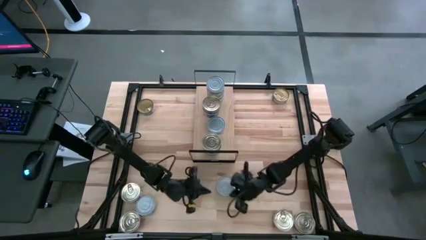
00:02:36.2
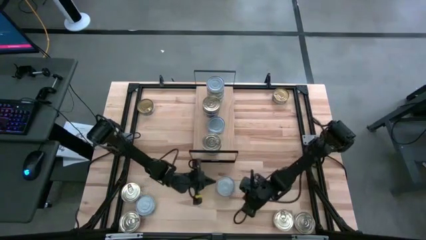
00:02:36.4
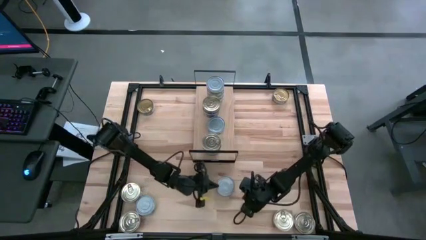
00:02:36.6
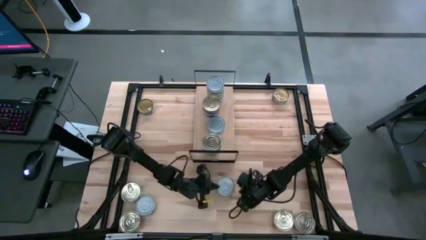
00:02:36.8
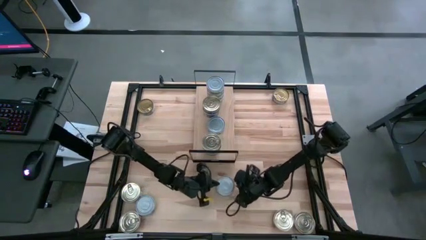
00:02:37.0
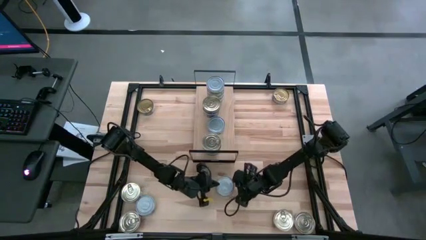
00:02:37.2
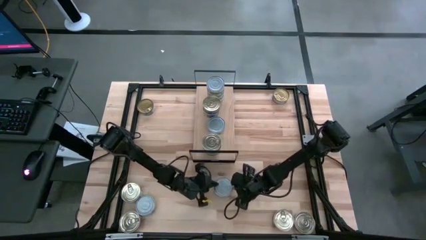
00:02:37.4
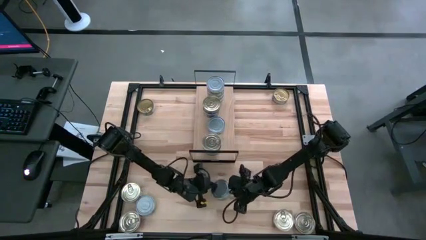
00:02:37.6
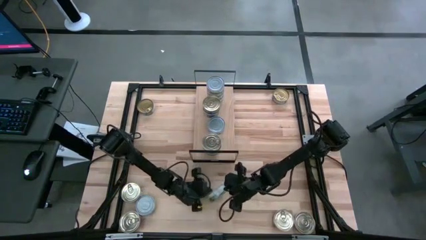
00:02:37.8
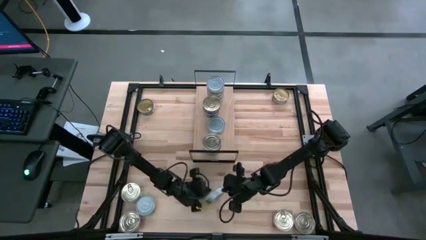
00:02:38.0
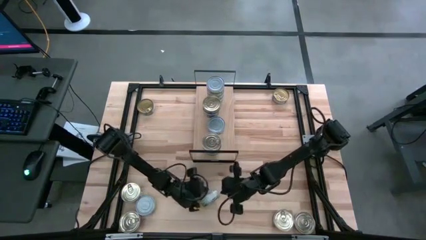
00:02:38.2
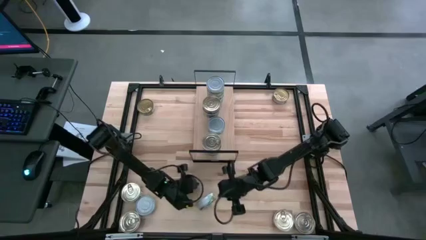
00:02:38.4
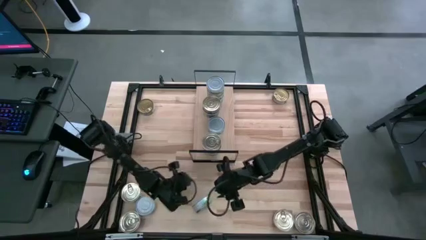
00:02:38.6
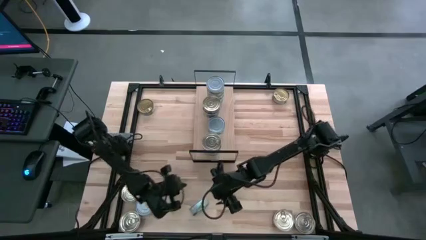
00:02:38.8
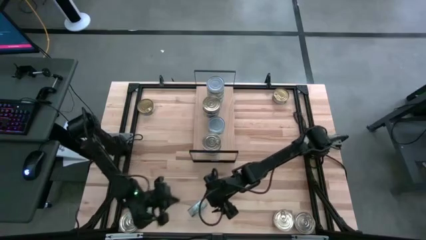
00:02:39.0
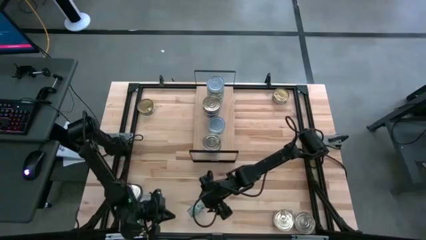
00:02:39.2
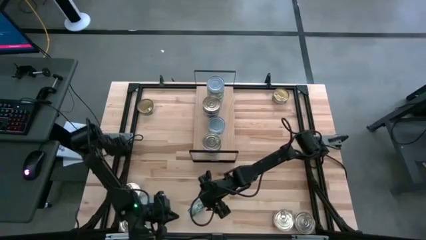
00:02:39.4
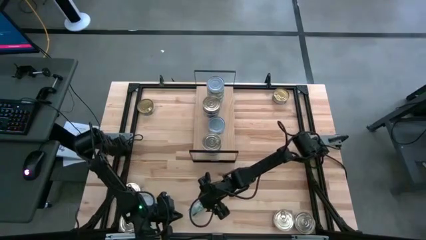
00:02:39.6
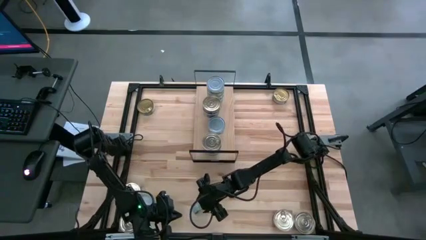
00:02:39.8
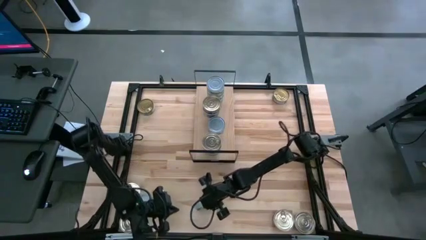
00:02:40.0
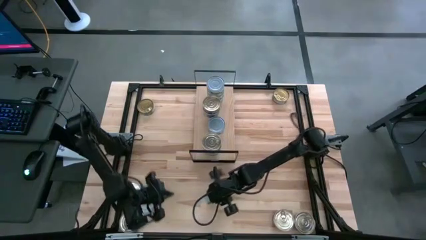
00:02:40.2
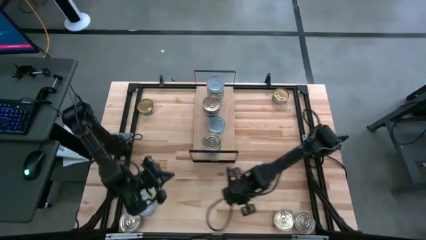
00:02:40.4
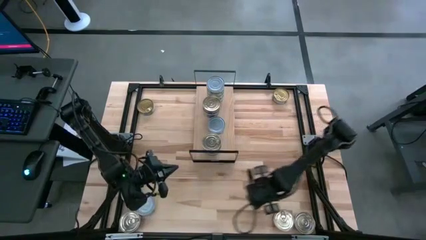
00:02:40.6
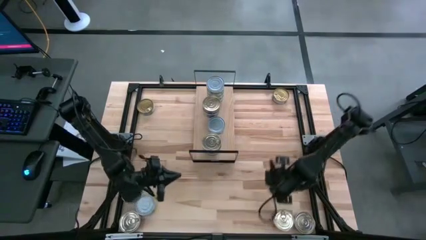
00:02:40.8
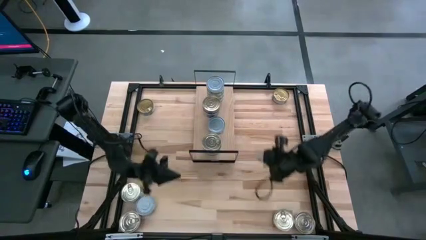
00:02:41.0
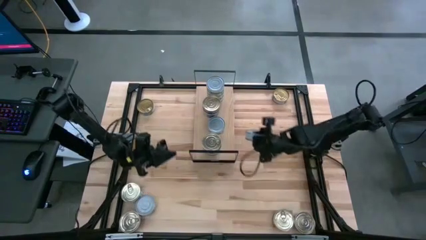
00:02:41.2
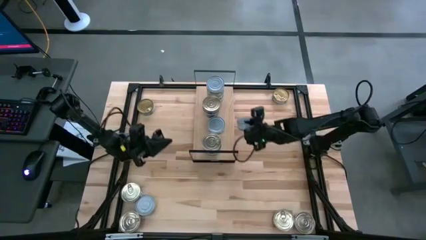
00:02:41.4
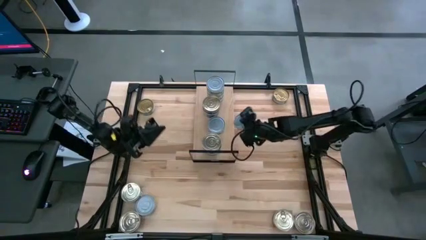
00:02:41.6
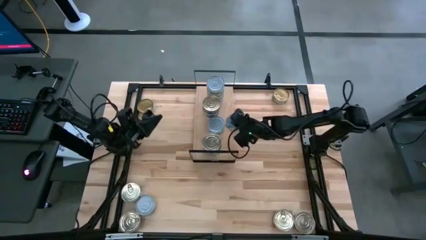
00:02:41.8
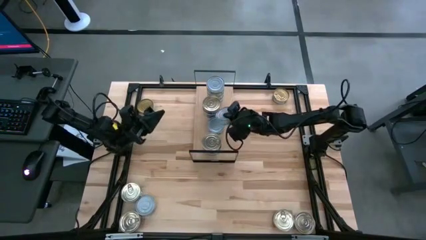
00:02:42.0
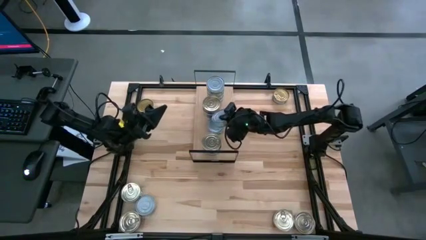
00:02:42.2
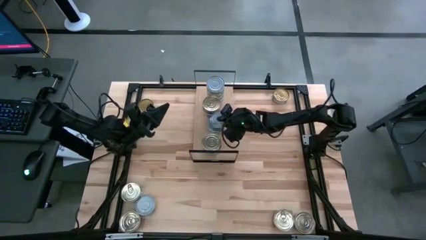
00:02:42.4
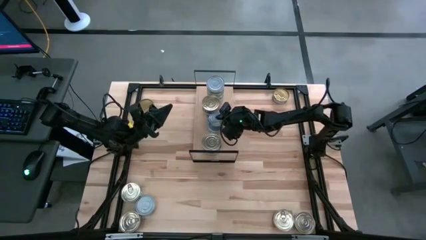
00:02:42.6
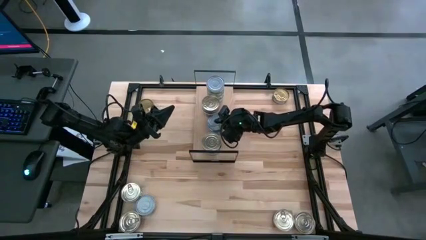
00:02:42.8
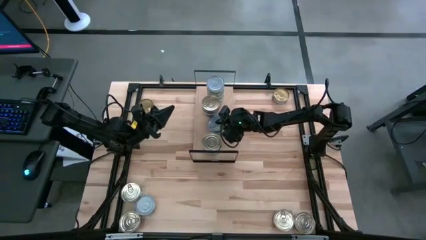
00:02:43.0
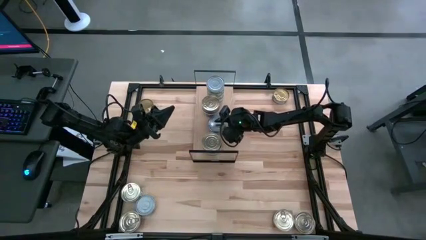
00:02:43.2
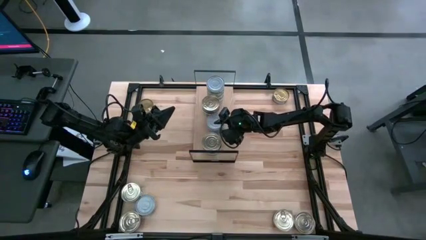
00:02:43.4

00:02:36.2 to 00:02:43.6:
Task: Stack canned seafood by type on shelf
Stack the green tuna can on top of the green tuna can on the shelf

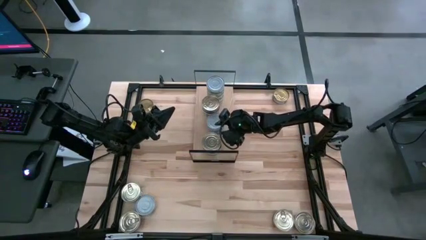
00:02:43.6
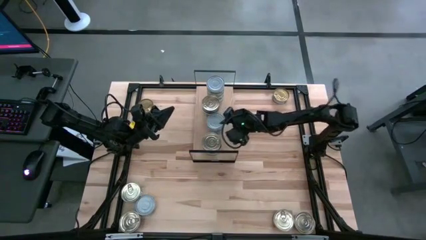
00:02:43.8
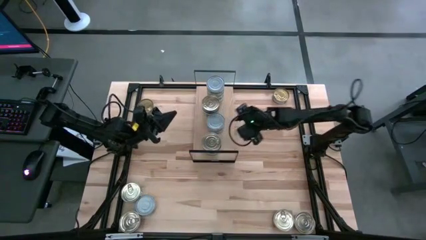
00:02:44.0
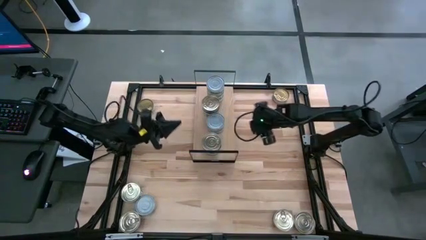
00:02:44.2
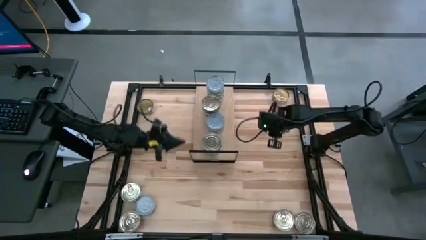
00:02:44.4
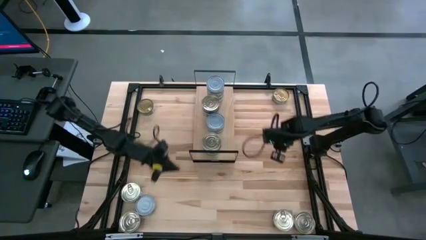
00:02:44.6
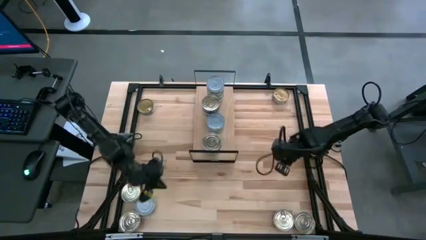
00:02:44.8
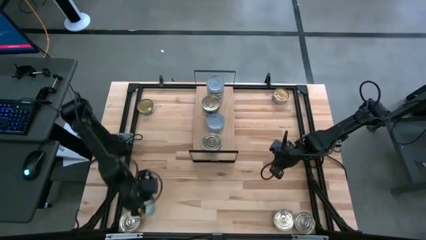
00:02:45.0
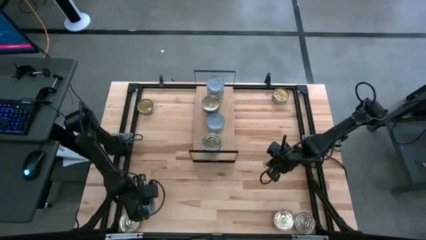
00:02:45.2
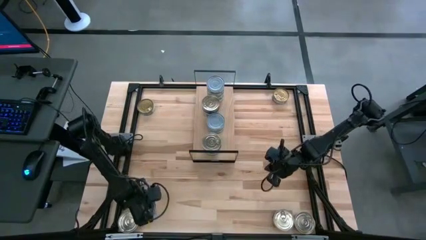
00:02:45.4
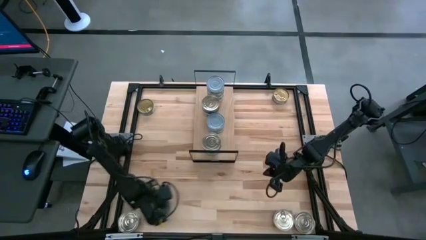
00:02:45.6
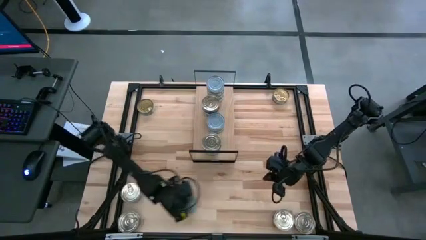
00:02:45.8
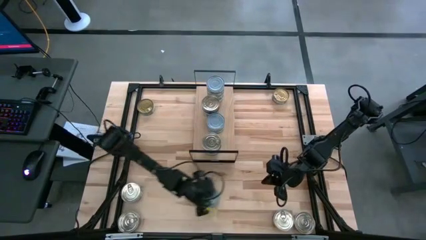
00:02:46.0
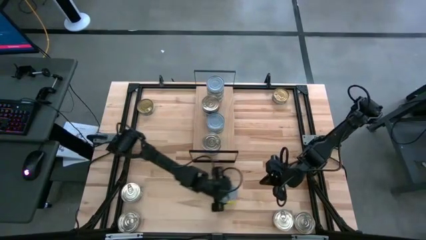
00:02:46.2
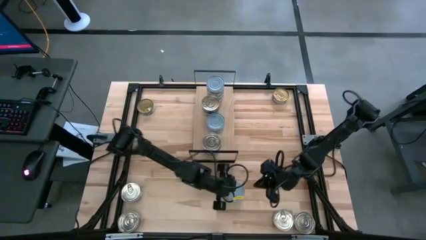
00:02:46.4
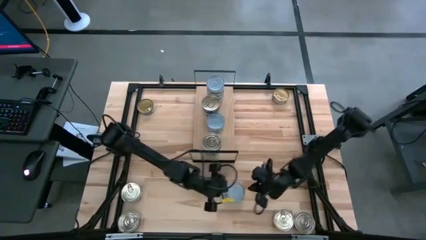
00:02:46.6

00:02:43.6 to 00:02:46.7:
Move the green tuna can to the bottom middle of the table

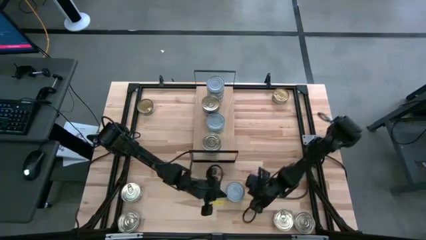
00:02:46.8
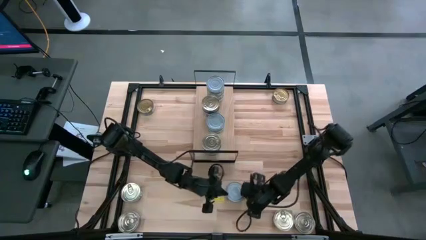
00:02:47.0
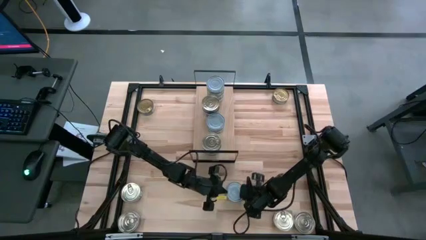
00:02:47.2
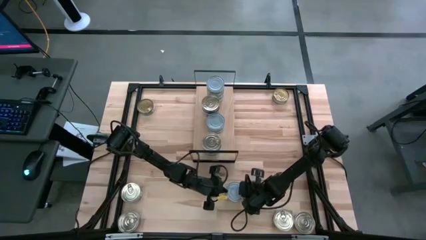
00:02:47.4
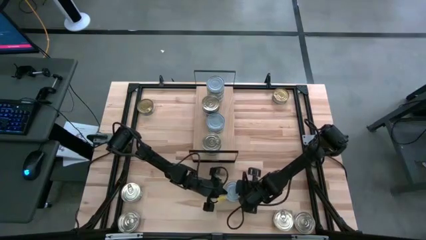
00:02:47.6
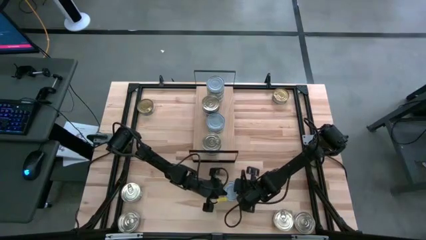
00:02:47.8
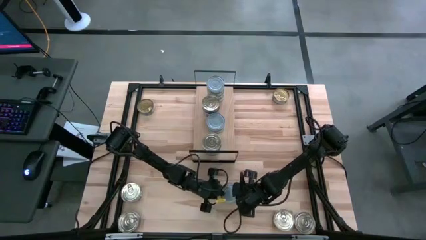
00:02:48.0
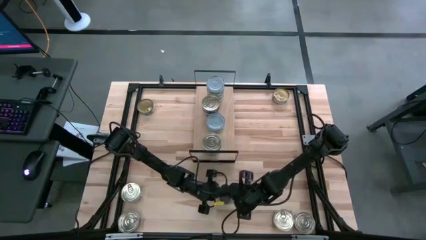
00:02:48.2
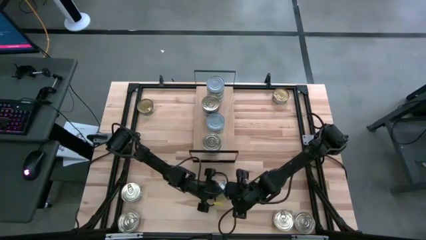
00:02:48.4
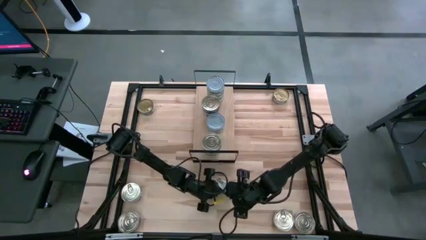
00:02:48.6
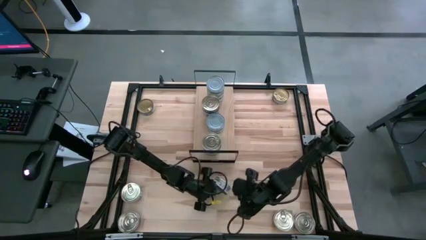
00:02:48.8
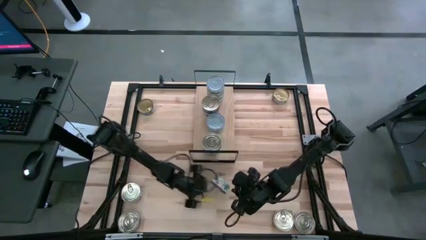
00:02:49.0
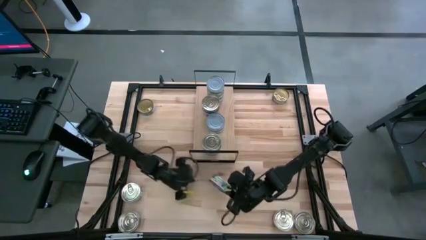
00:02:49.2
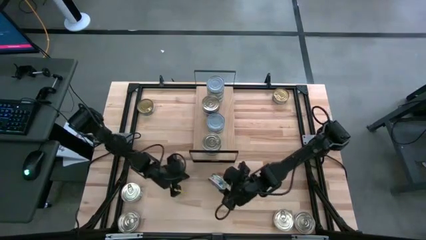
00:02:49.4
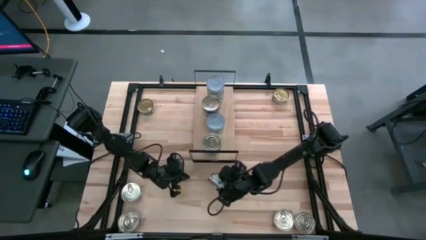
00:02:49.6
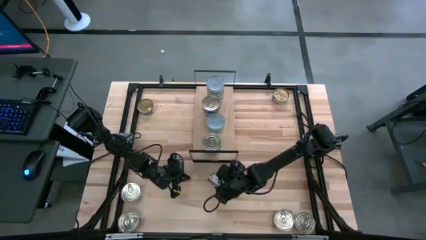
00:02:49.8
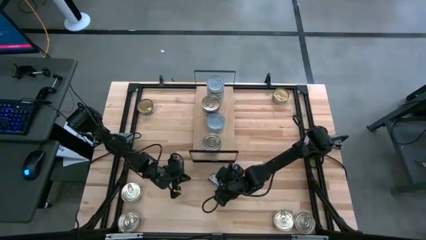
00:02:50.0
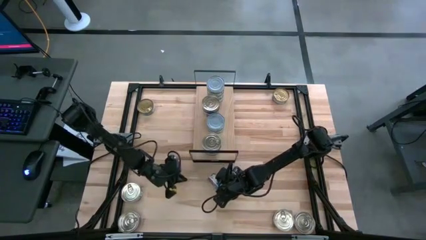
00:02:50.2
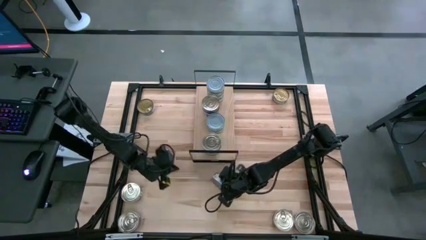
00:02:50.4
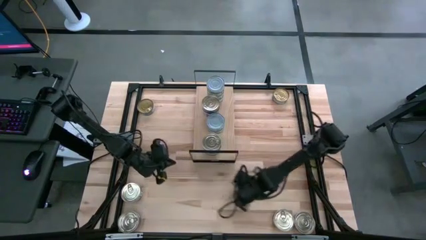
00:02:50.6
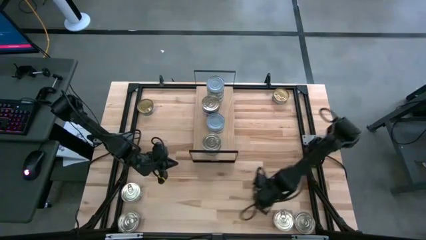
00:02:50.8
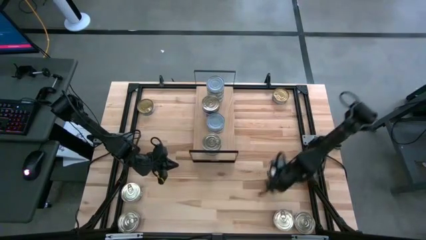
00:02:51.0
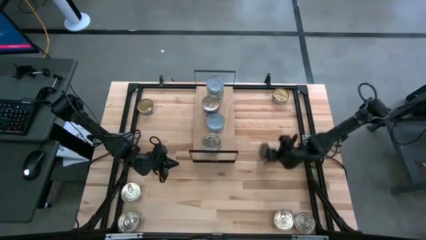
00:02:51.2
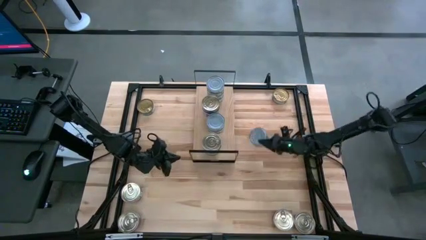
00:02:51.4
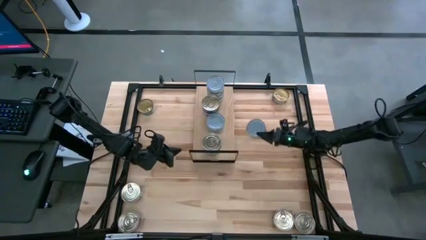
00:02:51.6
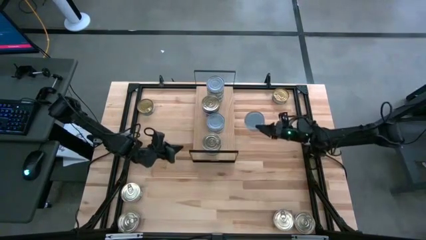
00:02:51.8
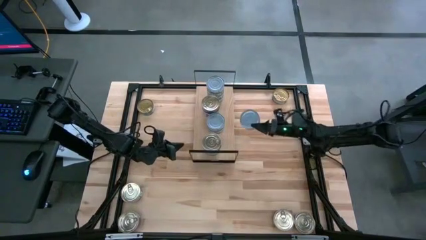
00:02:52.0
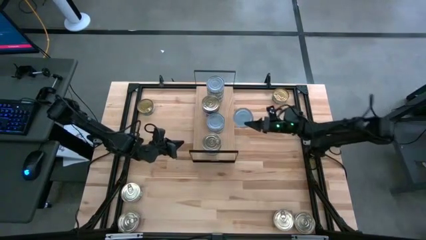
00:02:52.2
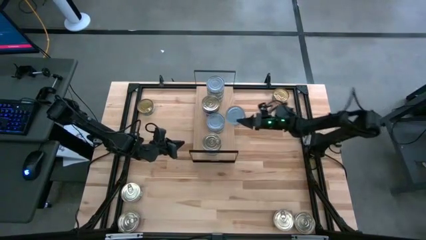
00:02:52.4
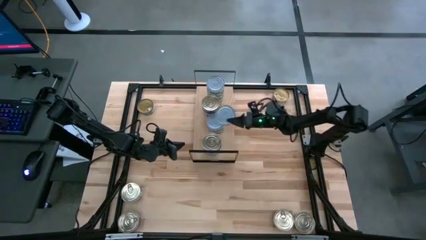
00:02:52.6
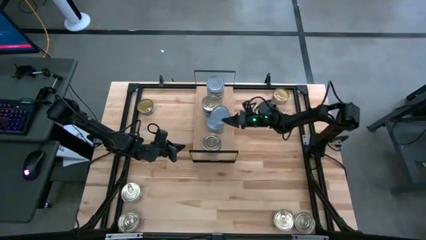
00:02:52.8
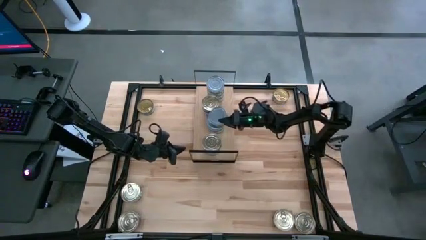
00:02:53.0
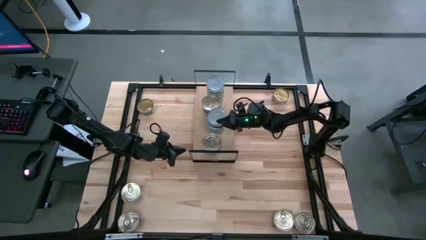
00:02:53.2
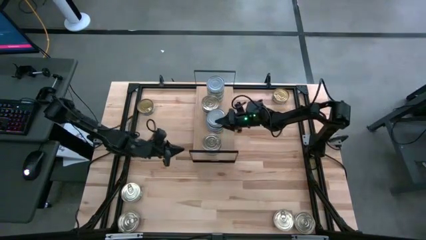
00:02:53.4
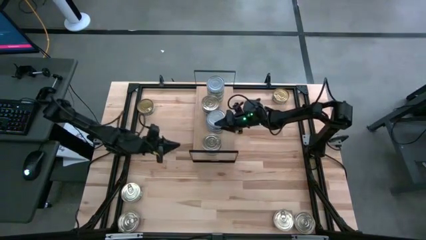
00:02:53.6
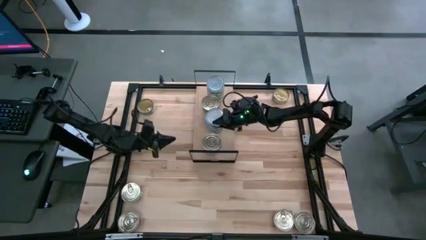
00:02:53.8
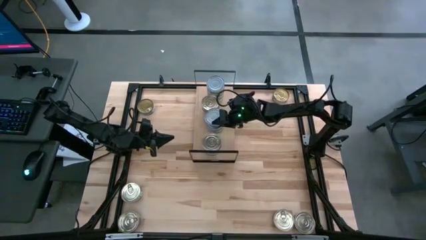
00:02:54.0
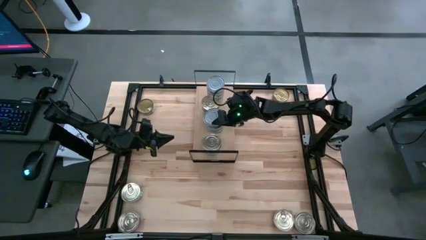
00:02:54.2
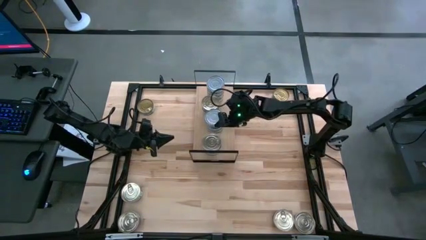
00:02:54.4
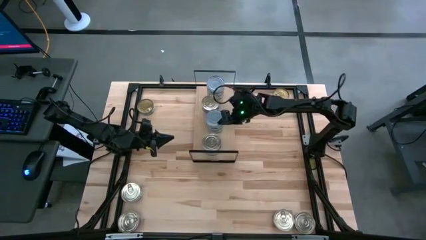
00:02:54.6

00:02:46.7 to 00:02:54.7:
Stack the green tuna can on top of the green tuna can on the shelf
